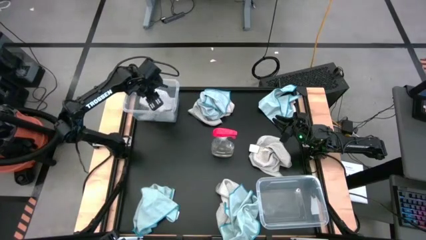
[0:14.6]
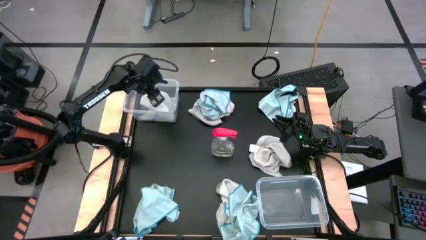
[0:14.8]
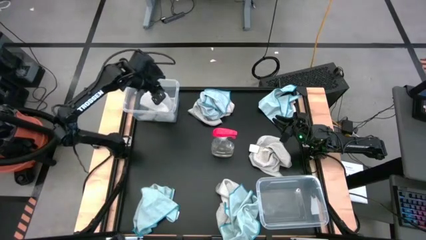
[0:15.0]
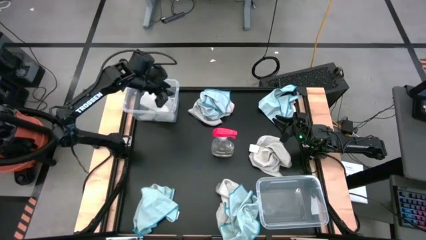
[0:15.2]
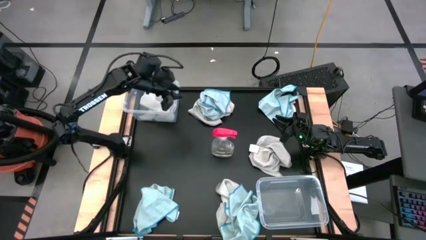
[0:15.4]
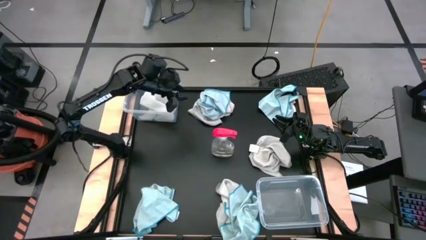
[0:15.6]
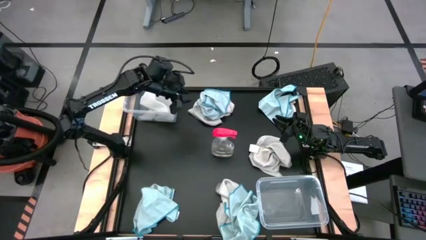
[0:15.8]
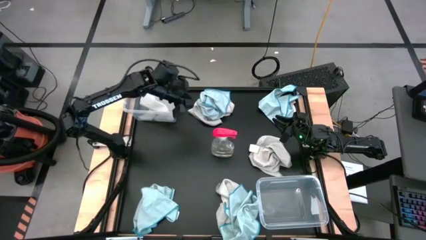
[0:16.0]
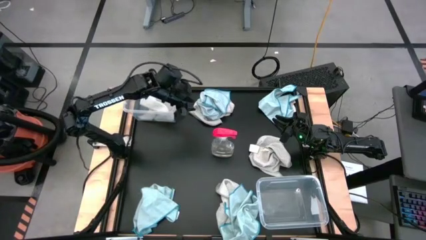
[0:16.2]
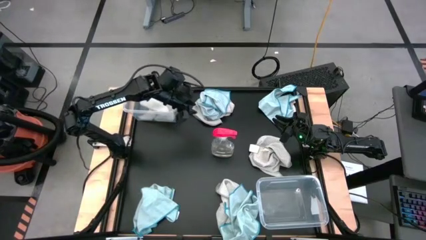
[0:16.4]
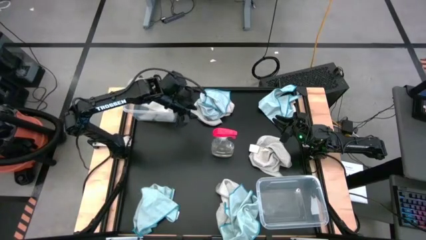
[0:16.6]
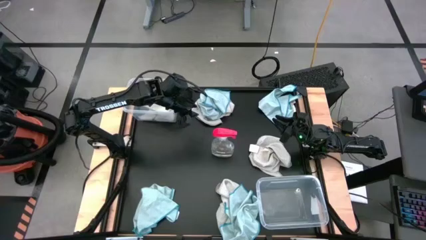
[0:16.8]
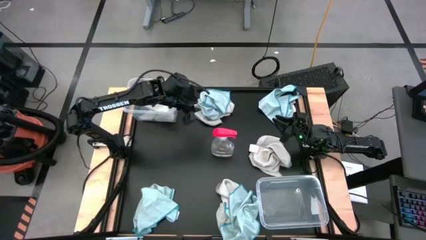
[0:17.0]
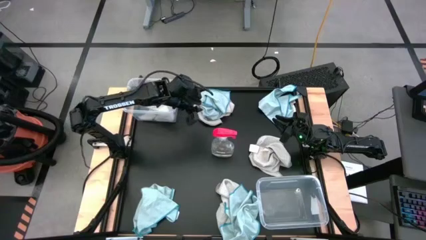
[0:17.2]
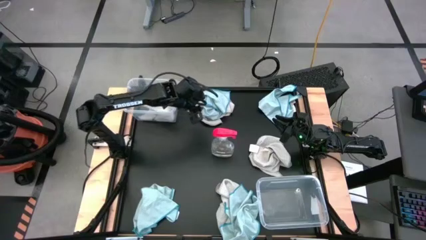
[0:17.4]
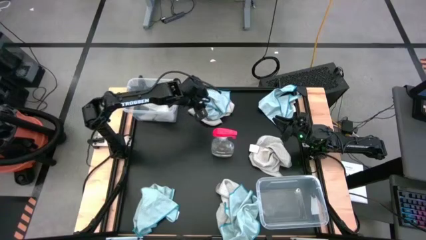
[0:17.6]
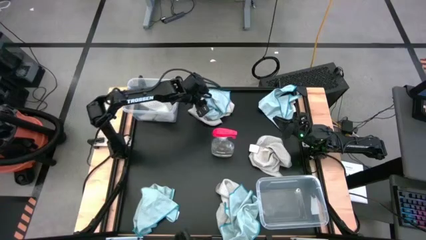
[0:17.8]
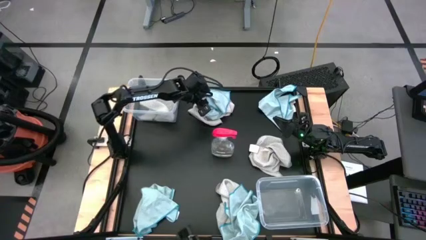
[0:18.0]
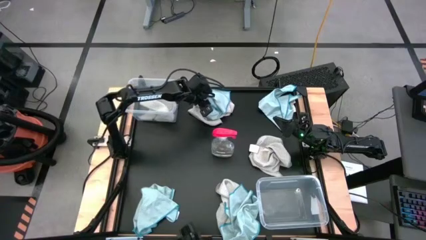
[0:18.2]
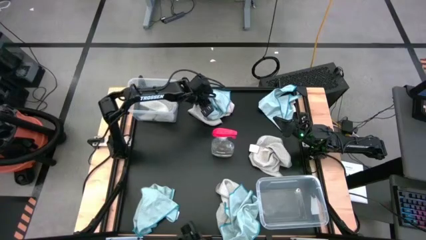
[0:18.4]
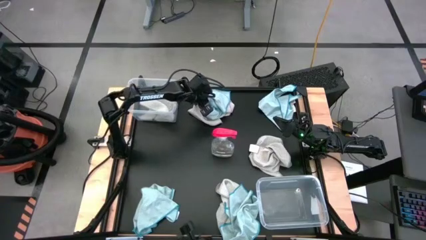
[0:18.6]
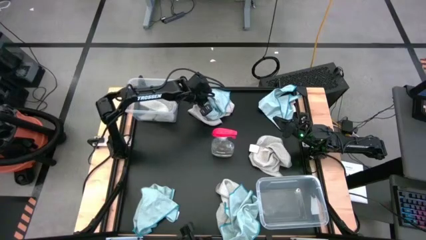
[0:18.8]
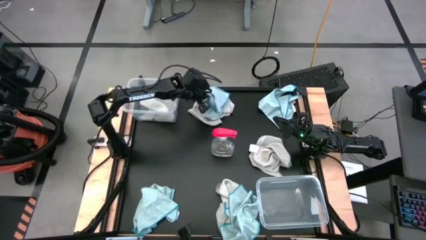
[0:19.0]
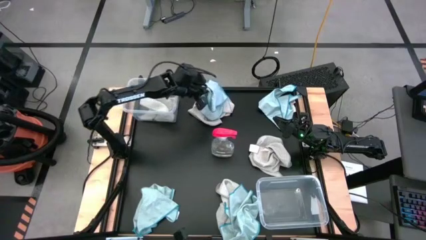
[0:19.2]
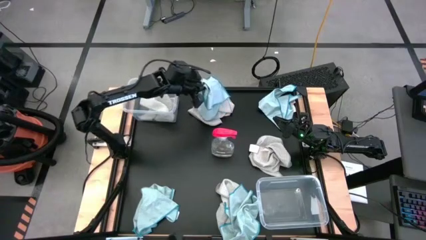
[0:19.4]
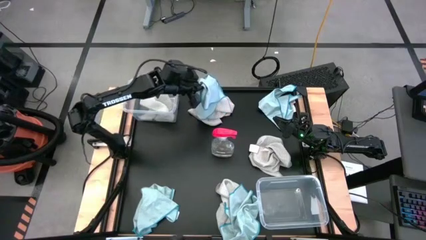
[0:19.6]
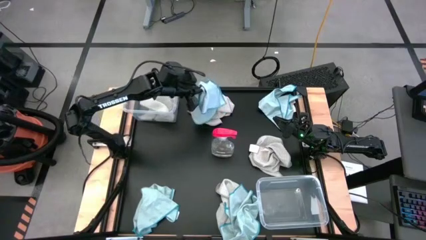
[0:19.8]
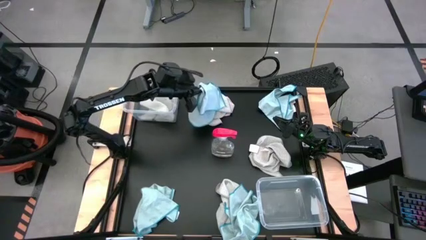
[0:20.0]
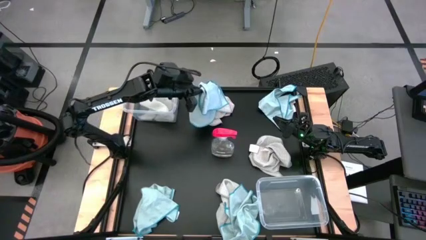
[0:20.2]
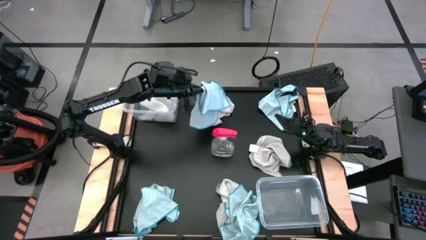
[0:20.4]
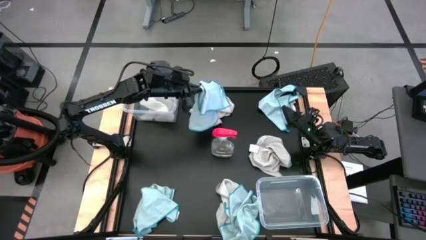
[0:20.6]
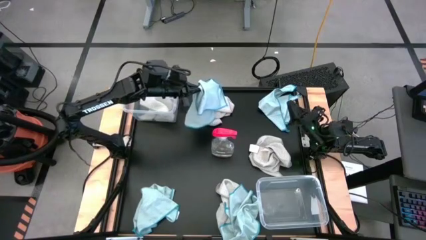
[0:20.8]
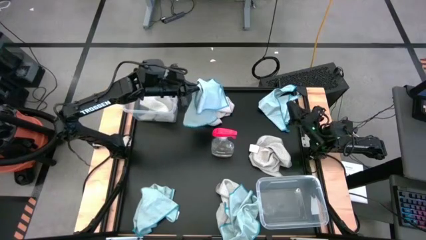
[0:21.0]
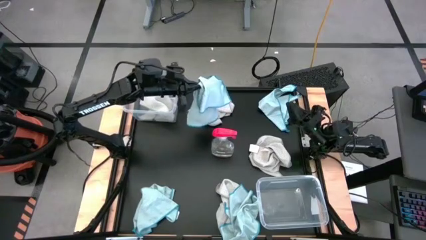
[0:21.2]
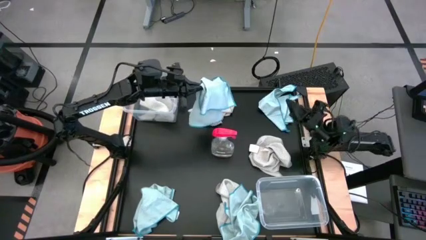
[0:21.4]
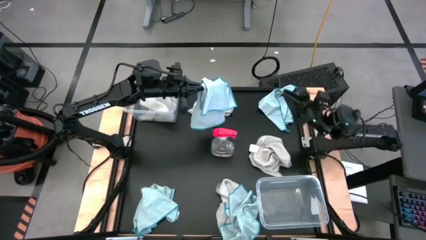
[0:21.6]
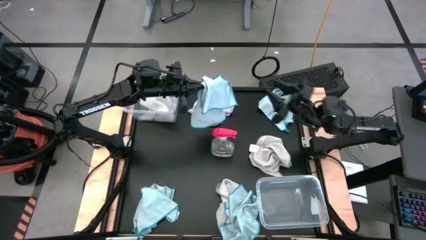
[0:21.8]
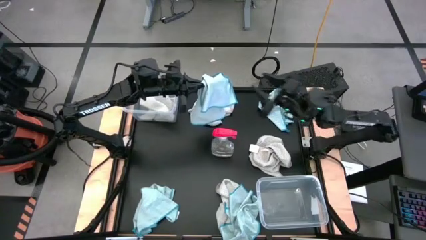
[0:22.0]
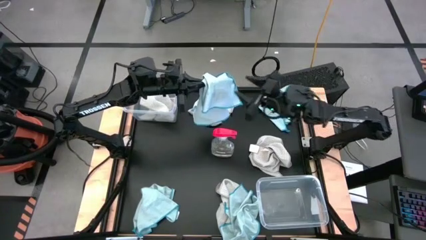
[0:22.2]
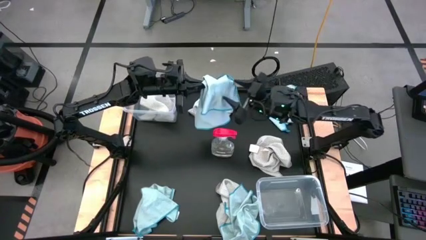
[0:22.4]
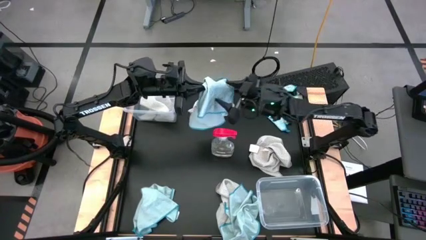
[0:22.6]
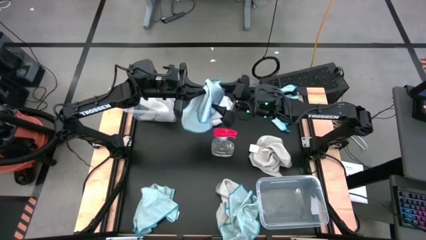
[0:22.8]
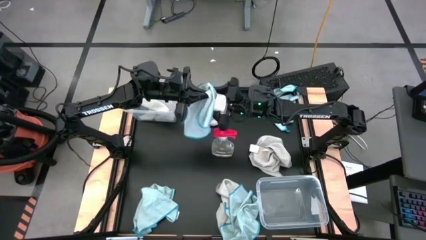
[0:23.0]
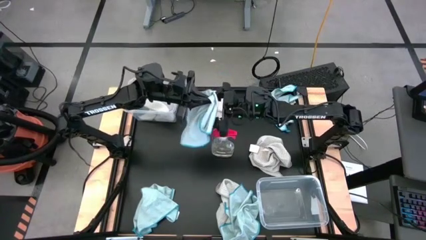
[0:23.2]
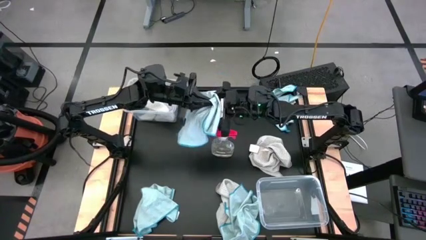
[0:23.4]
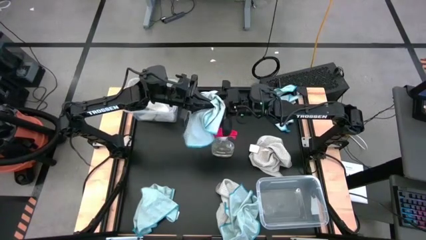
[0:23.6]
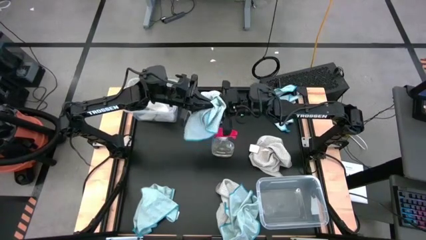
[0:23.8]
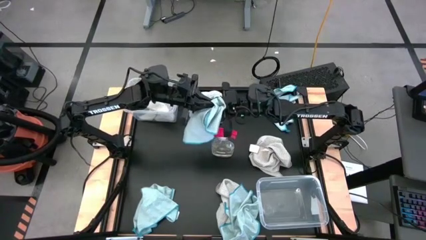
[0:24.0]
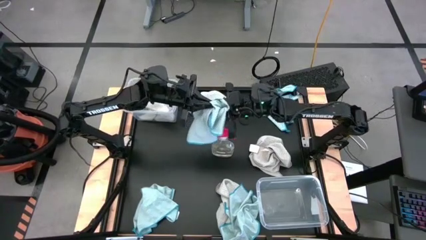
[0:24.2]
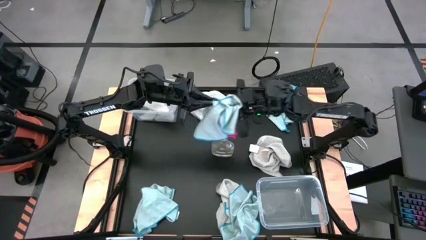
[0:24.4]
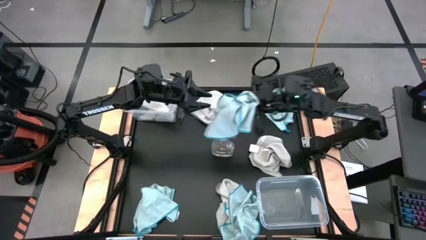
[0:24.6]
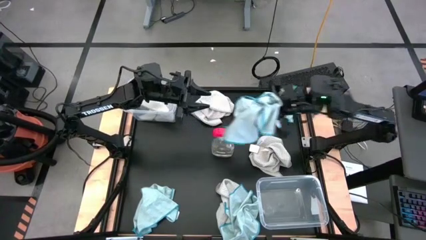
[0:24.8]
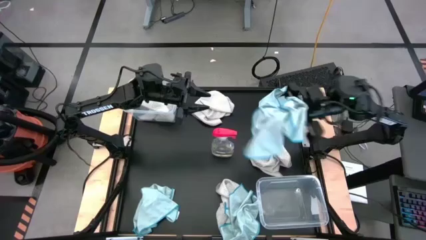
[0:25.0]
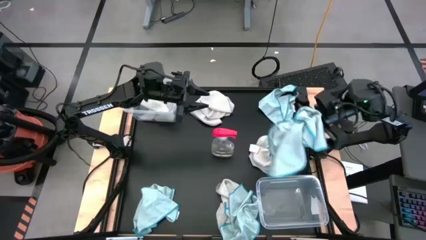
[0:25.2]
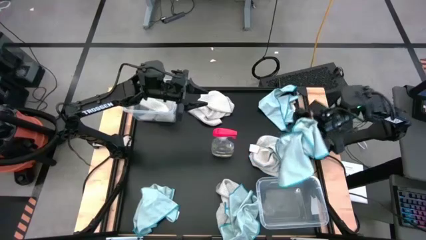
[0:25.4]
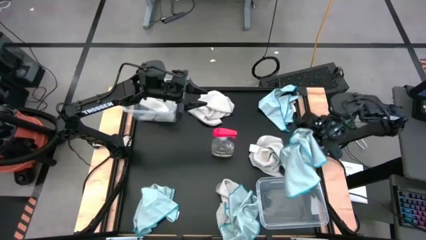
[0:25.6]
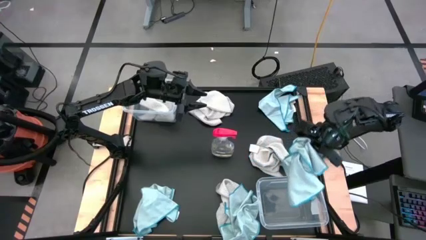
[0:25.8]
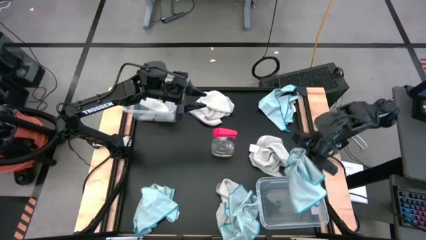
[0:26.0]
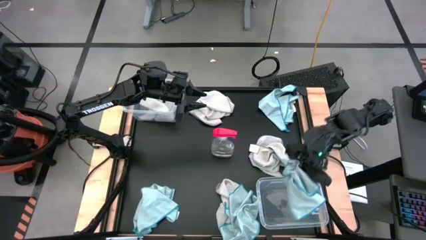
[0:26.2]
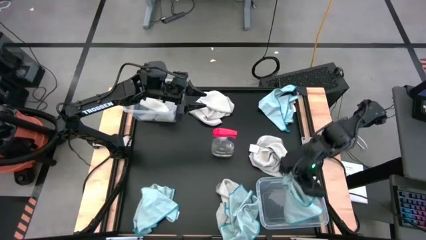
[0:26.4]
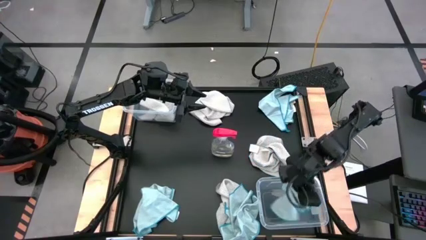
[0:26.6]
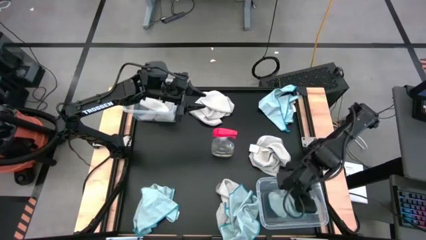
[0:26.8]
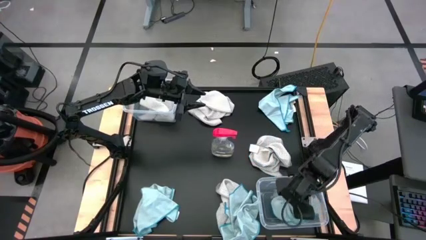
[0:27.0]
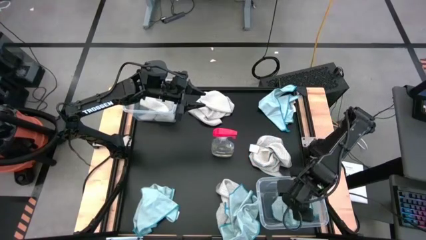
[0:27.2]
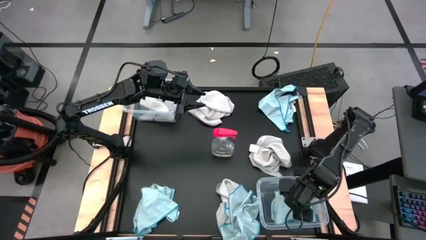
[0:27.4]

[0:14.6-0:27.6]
Task: Sort microfiber towel by color & place in baskets
Put the blue towel into the bottom transparent bin

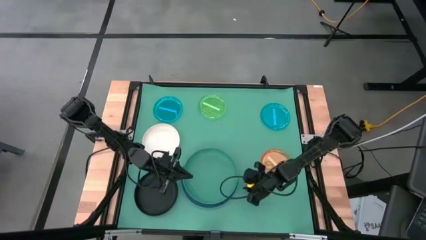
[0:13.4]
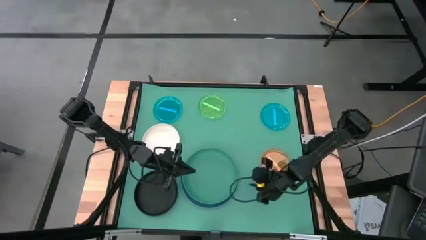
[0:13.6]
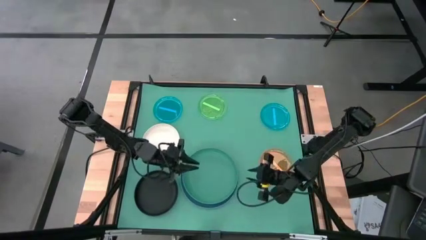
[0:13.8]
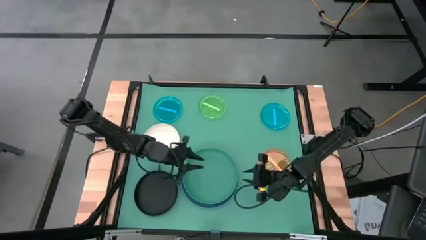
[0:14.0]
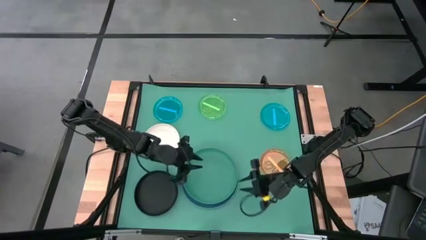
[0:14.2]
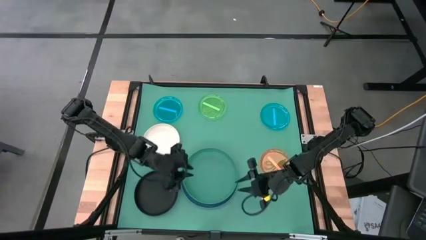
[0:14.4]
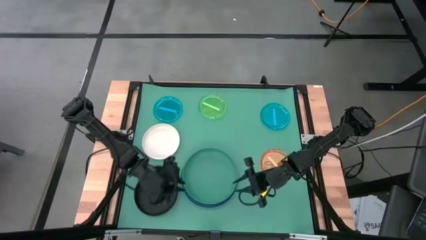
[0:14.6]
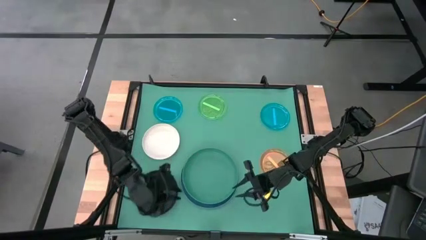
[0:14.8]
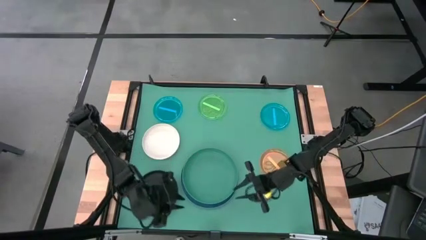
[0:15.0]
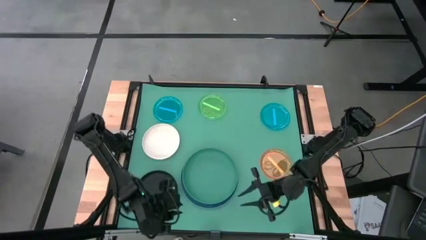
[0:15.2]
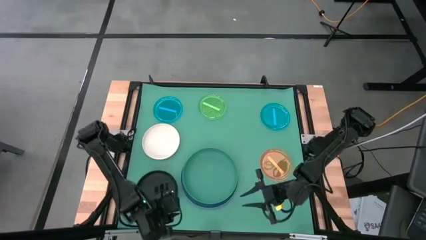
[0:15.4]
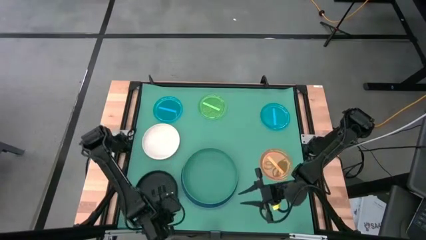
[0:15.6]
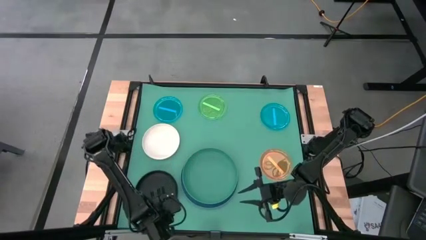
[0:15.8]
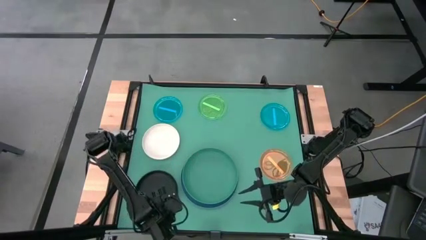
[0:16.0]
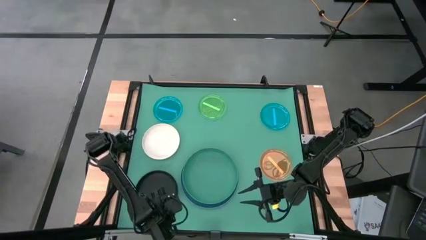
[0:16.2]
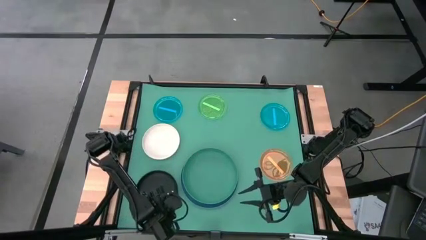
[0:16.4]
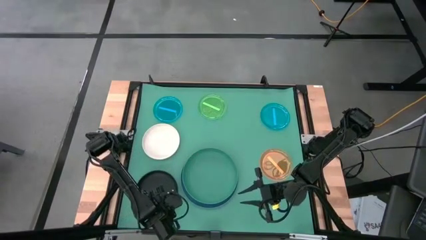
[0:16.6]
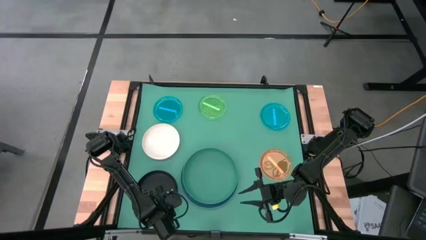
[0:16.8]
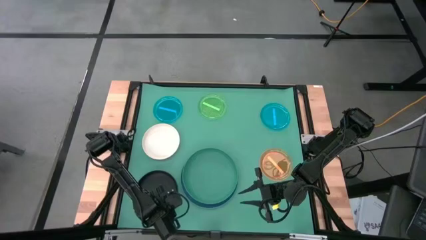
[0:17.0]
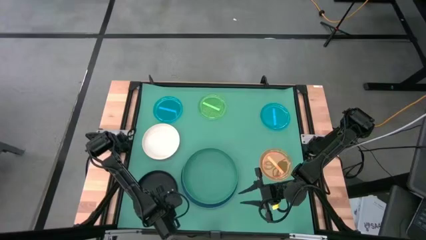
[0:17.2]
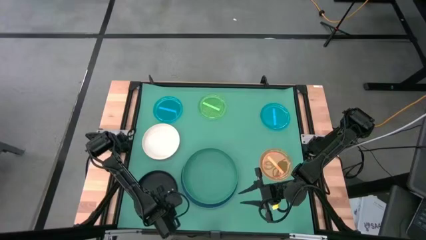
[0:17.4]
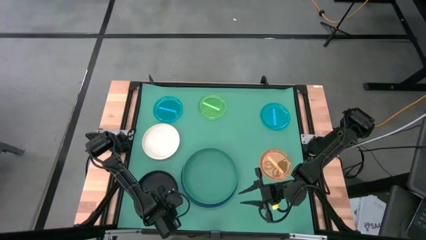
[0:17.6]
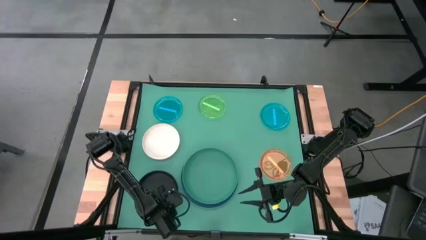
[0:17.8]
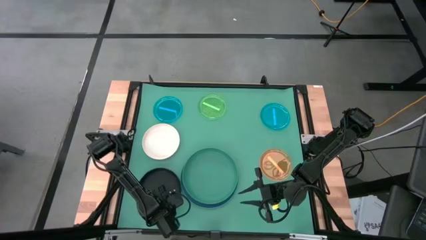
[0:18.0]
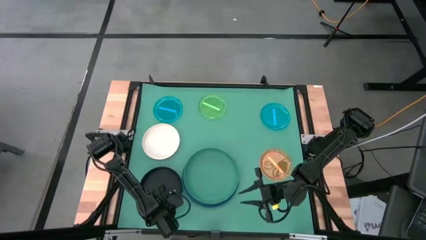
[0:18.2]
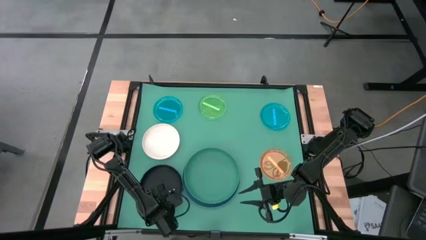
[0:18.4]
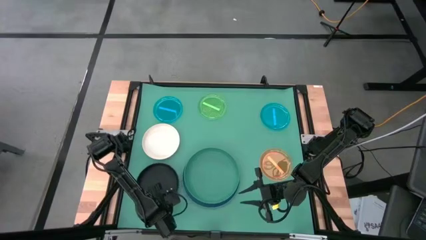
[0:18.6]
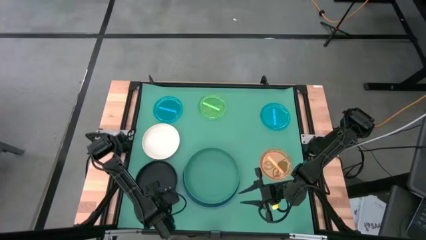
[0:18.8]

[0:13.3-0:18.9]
Task: Stack plastic plates
Stack the black plate on top of the green plate
